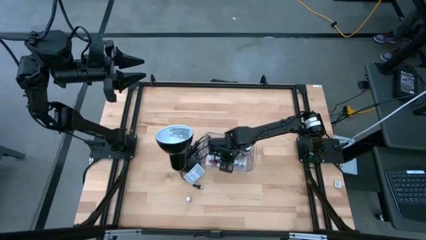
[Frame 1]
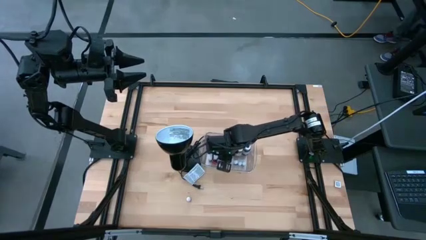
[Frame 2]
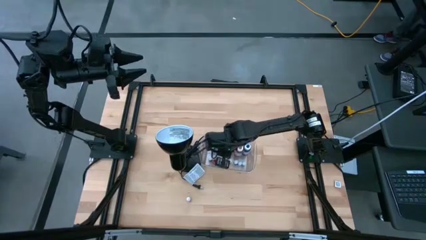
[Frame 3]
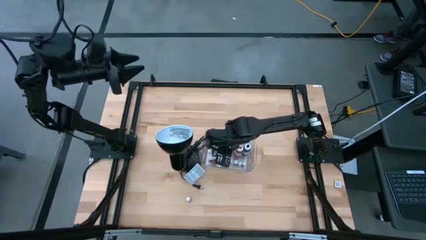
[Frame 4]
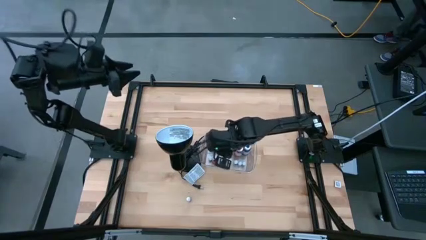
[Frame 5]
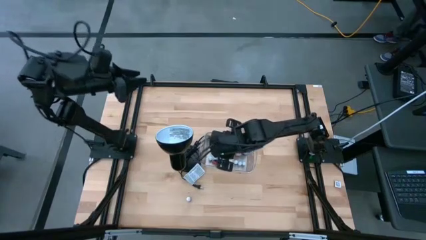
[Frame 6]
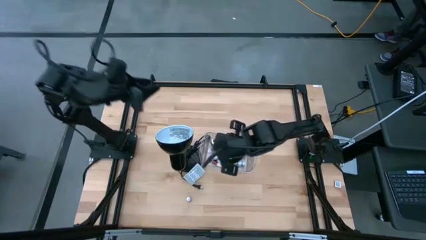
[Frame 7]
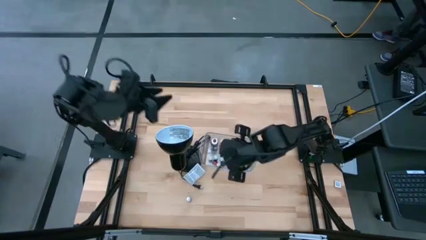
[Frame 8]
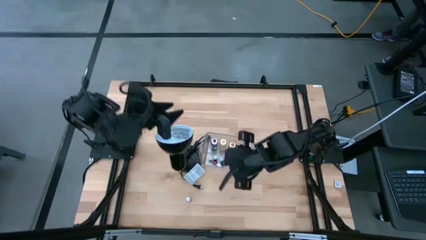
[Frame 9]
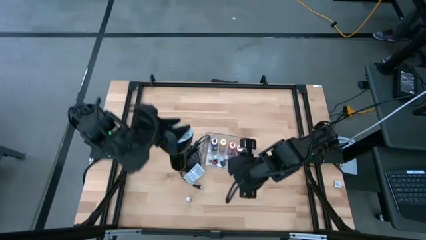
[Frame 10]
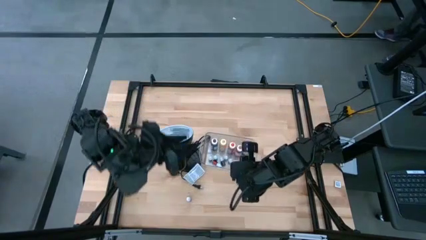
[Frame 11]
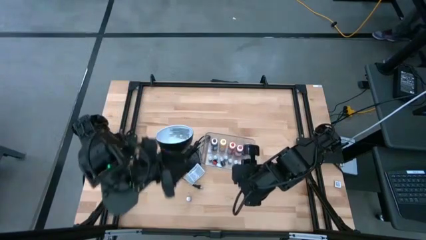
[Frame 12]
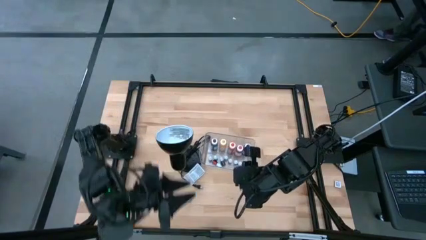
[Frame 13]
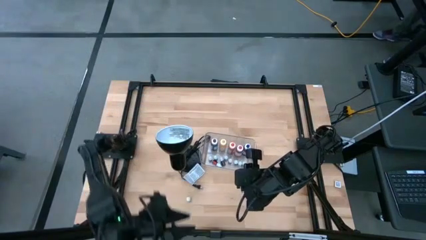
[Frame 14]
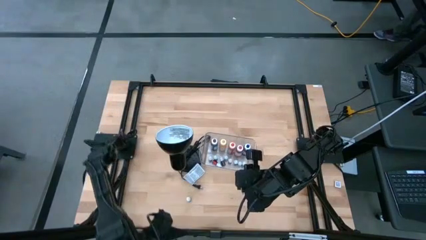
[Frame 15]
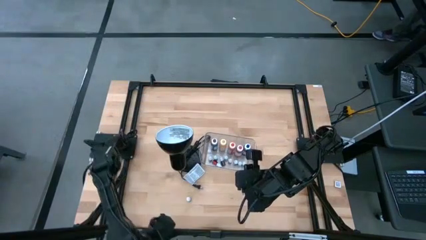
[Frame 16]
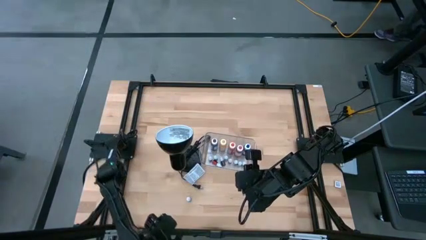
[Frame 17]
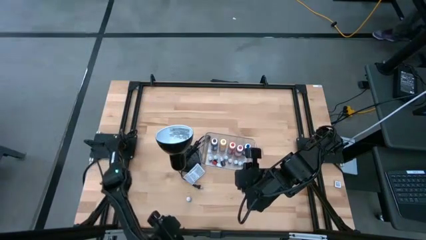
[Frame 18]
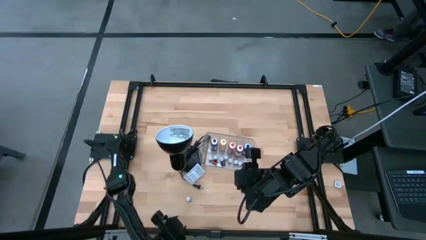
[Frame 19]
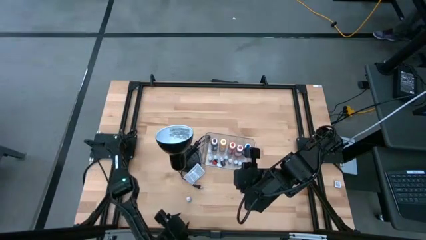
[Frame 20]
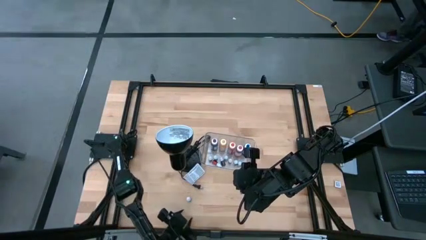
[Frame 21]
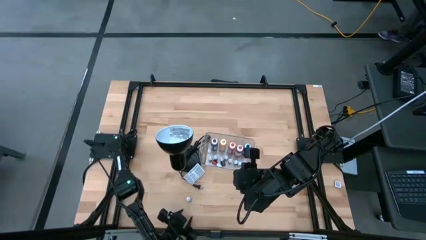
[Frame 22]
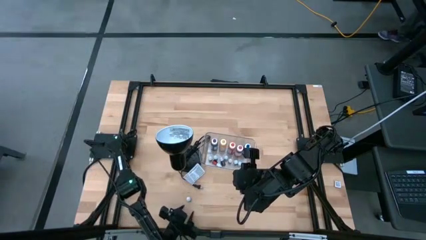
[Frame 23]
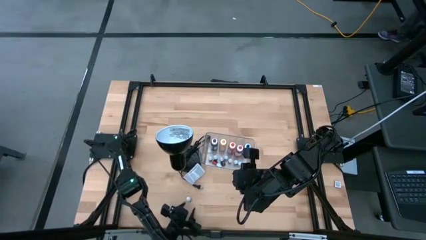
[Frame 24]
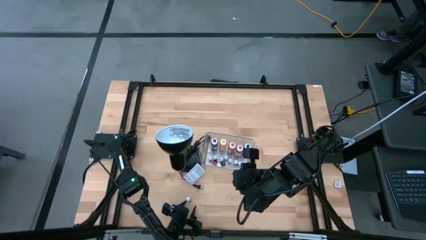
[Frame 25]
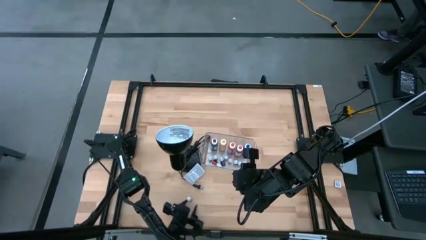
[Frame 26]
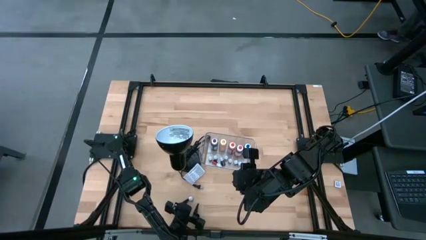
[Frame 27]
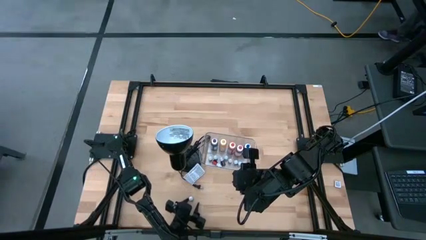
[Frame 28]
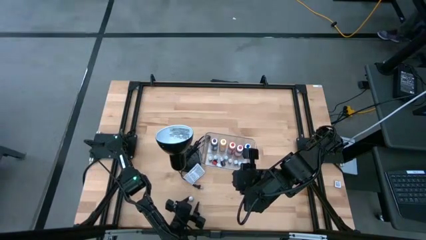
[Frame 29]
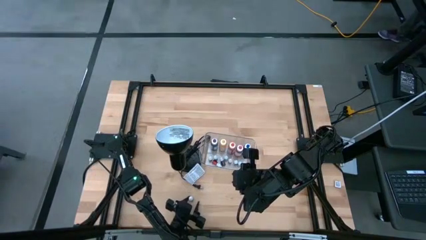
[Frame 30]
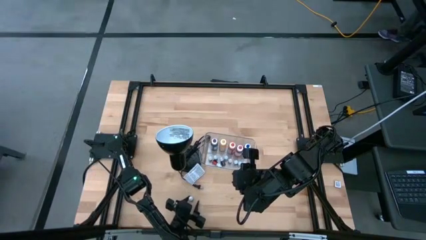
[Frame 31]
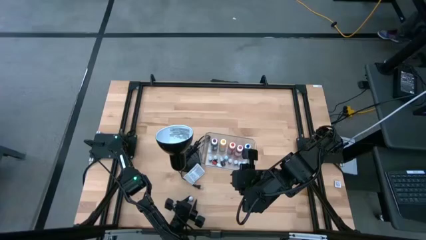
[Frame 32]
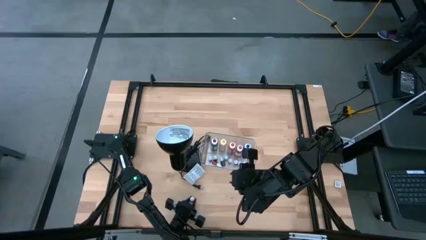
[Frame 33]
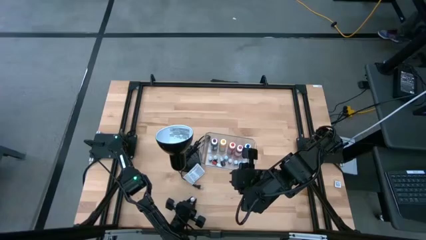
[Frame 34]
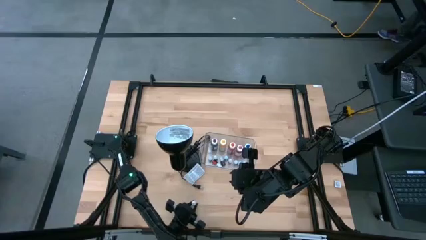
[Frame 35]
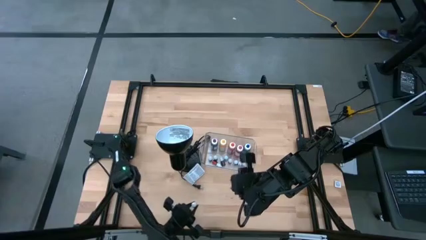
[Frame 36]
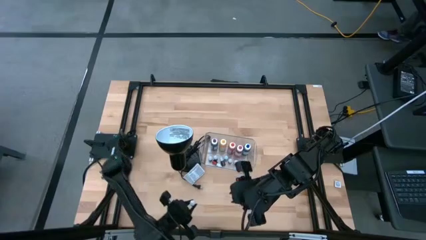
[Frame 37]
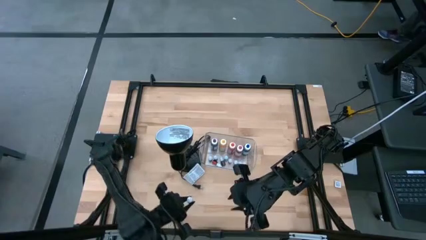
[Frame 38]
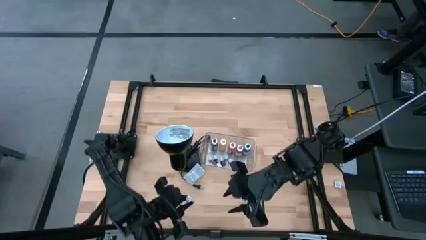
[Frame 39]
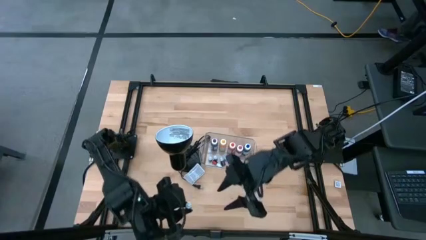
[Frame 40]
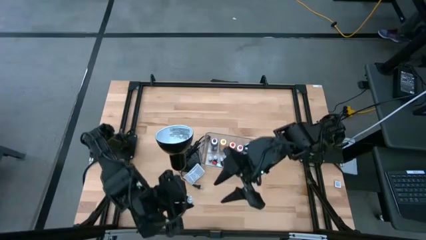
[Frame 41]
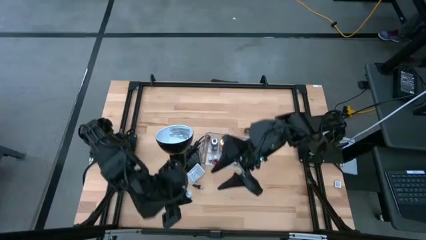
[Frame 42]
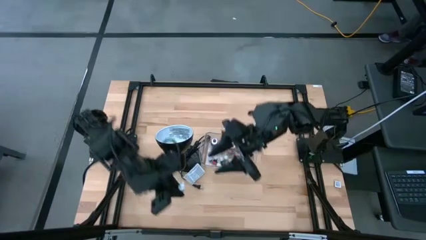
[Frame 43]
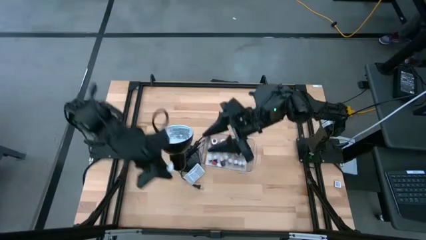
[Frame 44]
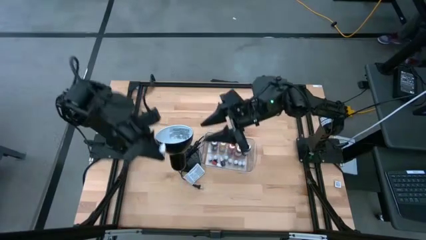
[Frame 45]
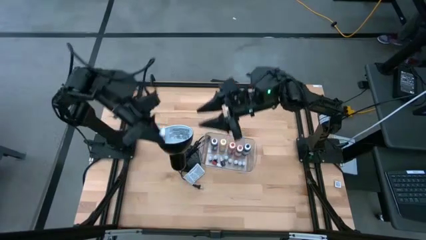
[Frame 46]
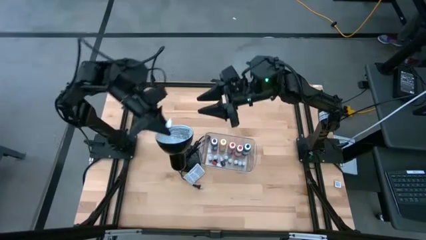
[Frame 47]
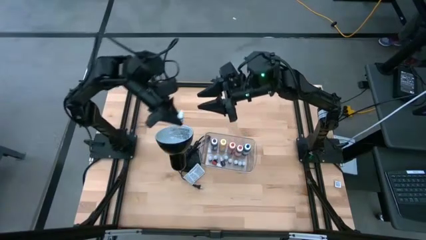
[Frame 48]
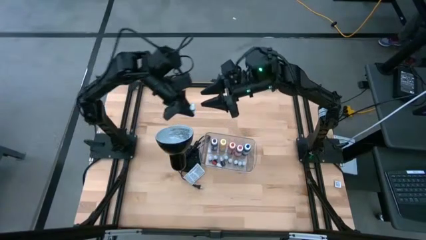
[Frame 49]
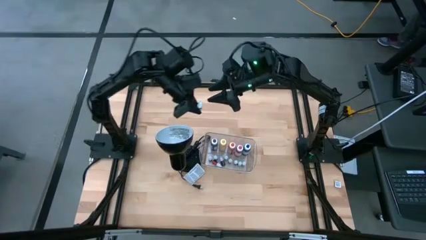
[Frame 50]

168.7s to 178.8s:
Task: Pick & Place food coloring
Put the small red food coloring bottle into the transparent bin
